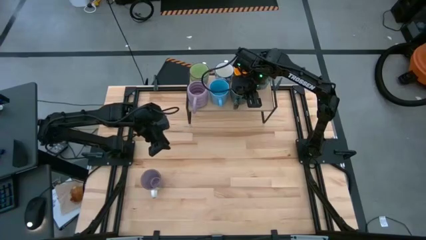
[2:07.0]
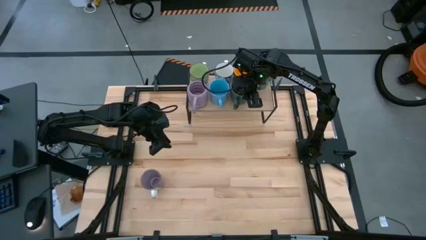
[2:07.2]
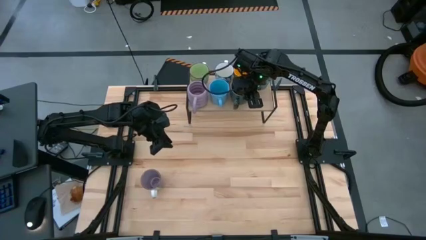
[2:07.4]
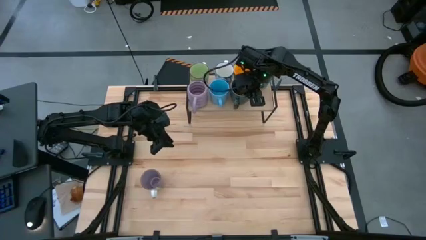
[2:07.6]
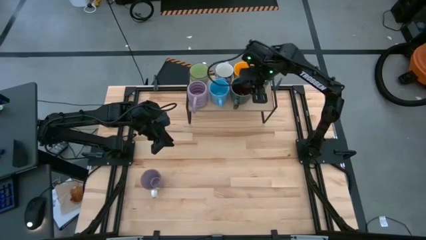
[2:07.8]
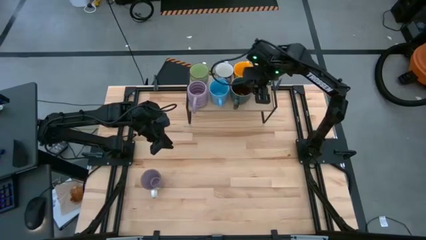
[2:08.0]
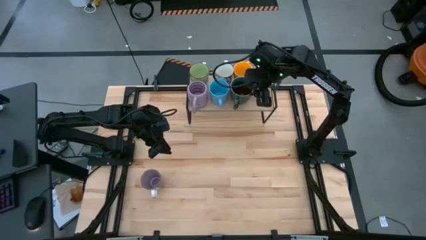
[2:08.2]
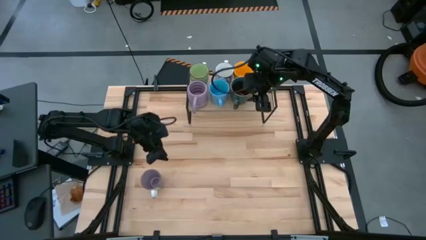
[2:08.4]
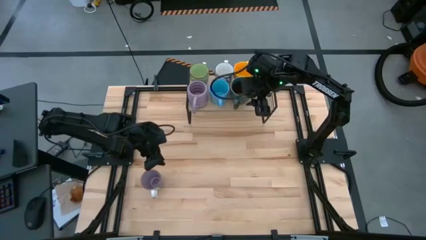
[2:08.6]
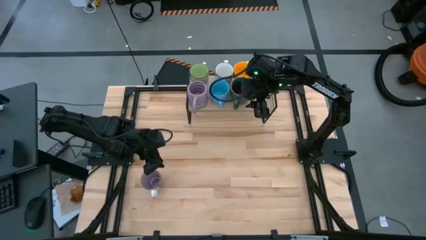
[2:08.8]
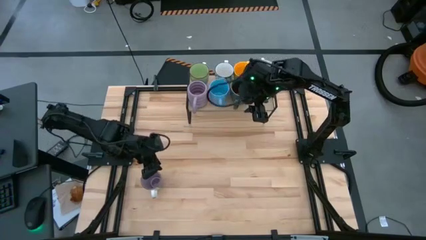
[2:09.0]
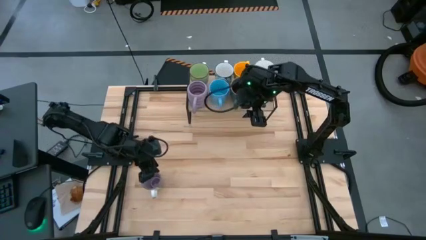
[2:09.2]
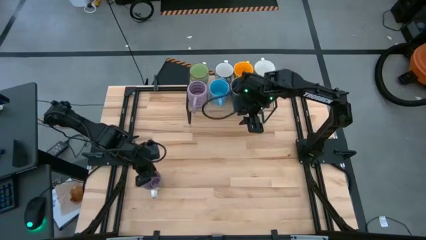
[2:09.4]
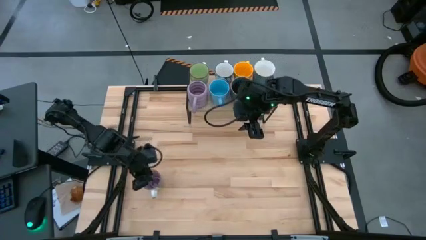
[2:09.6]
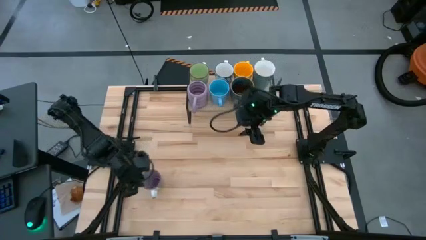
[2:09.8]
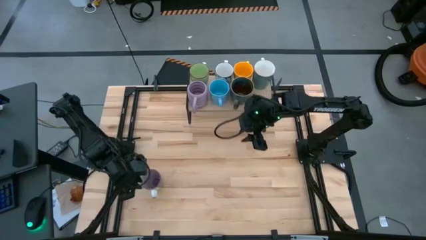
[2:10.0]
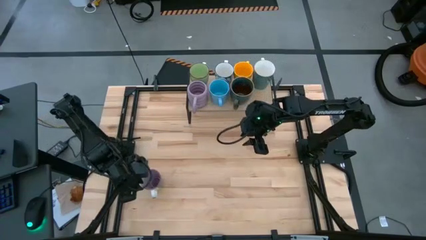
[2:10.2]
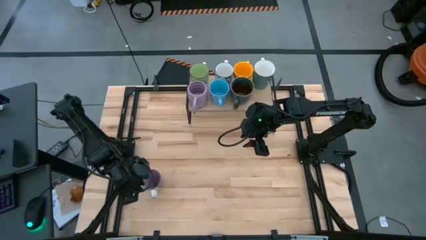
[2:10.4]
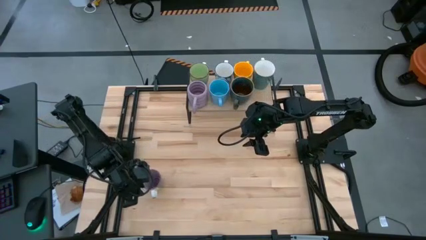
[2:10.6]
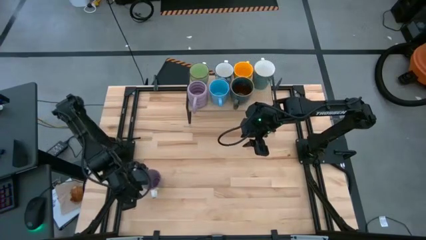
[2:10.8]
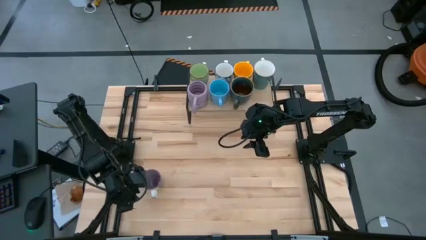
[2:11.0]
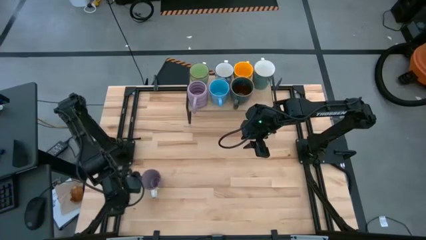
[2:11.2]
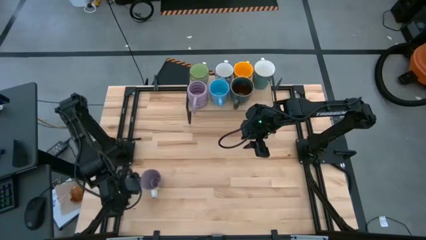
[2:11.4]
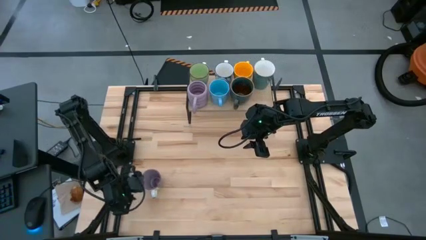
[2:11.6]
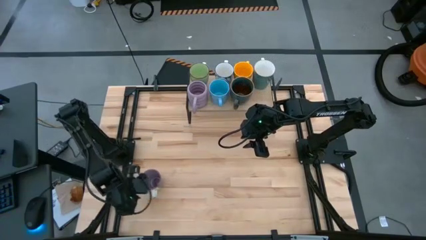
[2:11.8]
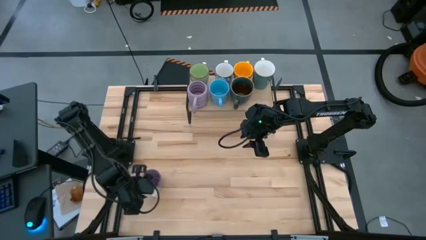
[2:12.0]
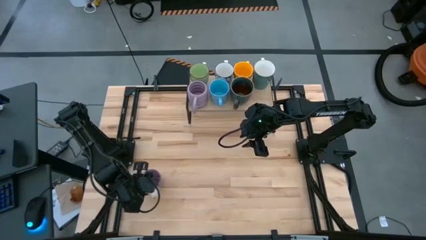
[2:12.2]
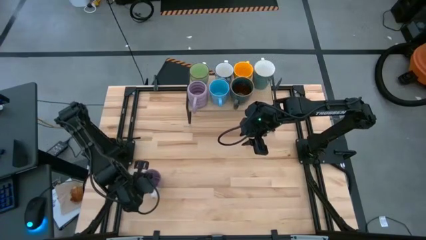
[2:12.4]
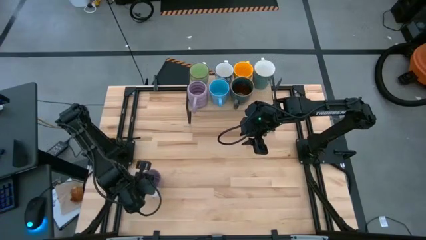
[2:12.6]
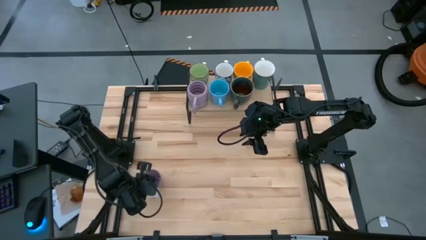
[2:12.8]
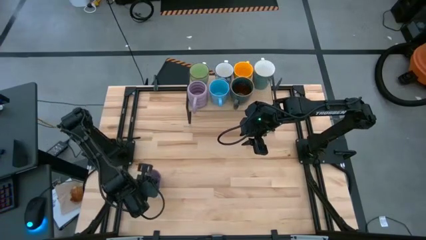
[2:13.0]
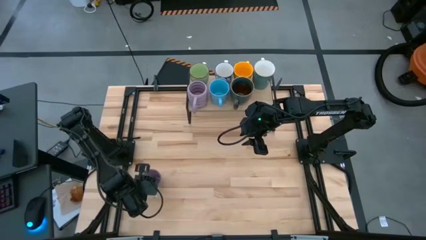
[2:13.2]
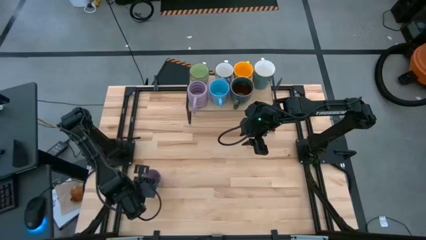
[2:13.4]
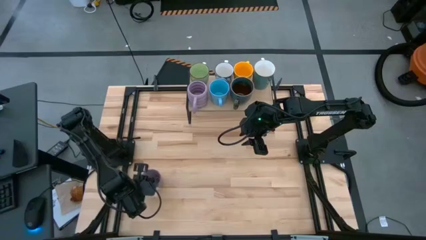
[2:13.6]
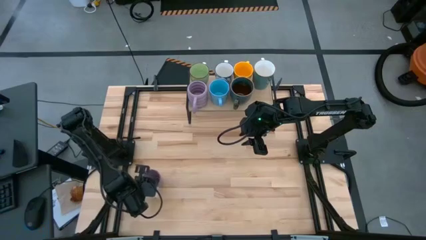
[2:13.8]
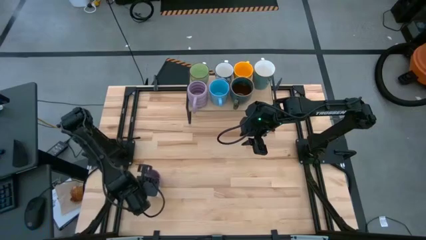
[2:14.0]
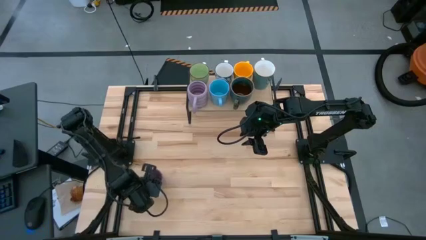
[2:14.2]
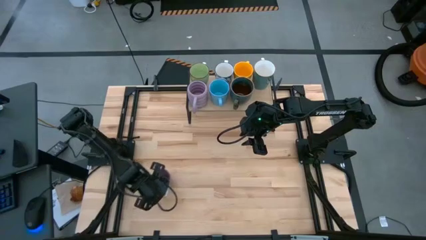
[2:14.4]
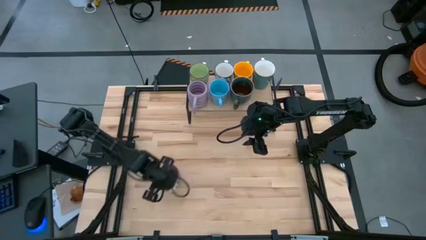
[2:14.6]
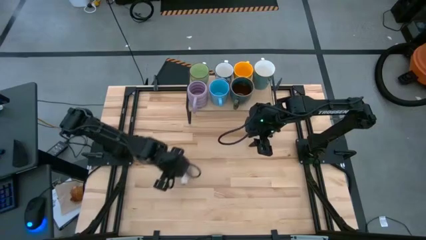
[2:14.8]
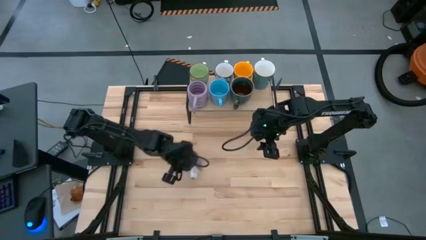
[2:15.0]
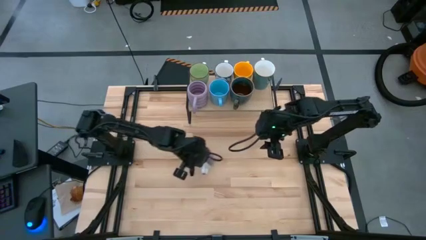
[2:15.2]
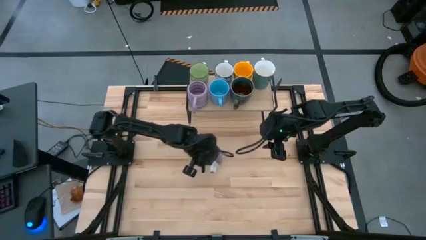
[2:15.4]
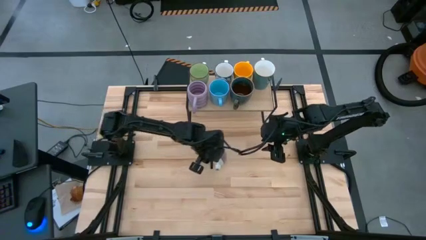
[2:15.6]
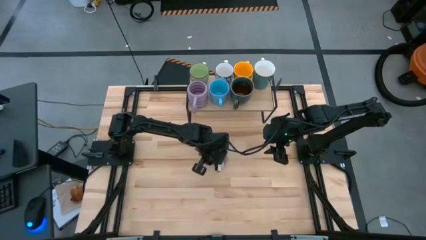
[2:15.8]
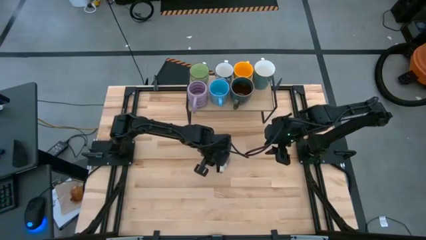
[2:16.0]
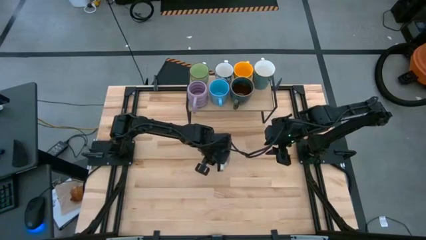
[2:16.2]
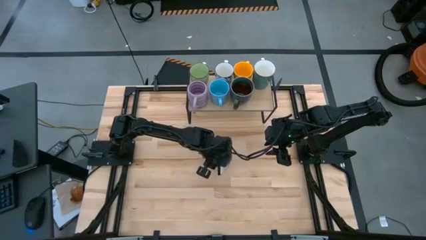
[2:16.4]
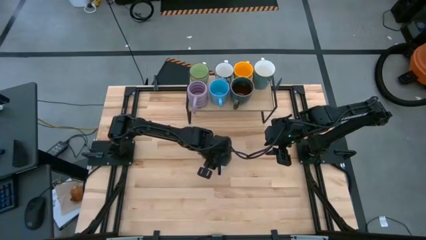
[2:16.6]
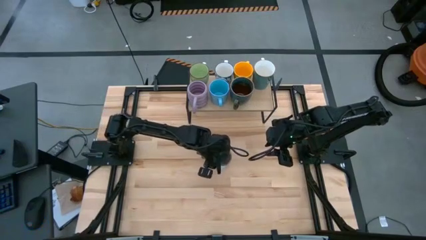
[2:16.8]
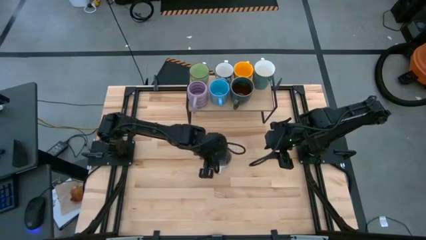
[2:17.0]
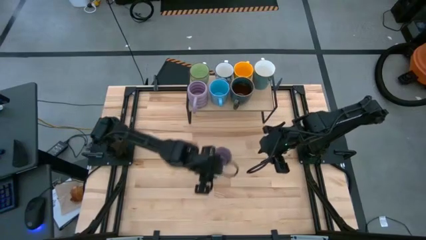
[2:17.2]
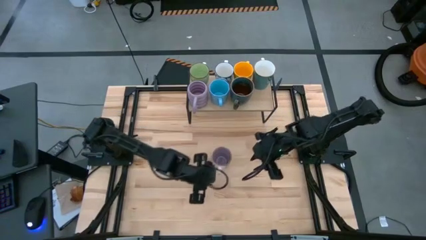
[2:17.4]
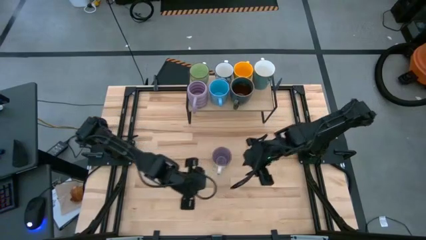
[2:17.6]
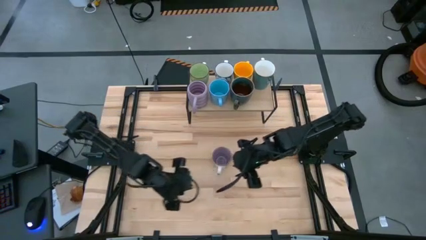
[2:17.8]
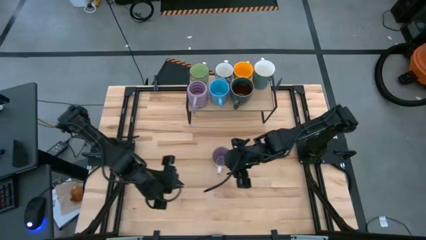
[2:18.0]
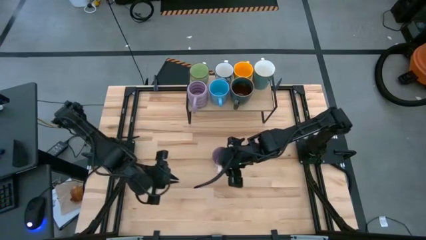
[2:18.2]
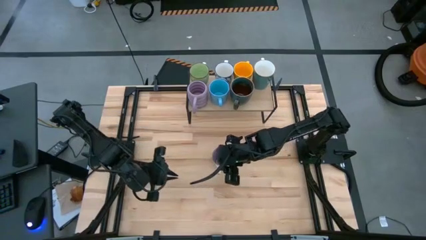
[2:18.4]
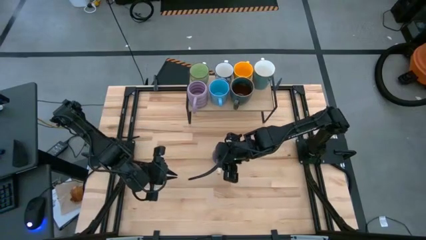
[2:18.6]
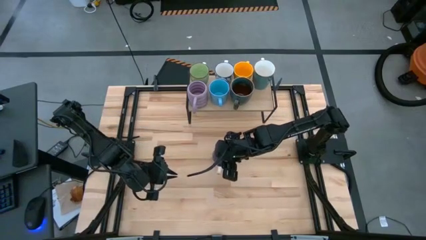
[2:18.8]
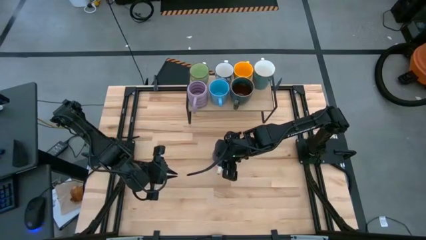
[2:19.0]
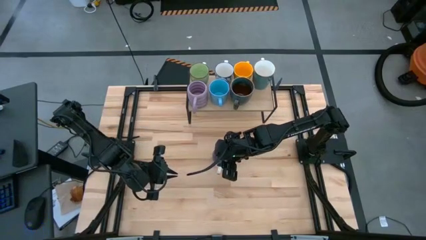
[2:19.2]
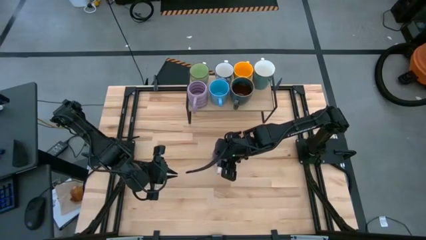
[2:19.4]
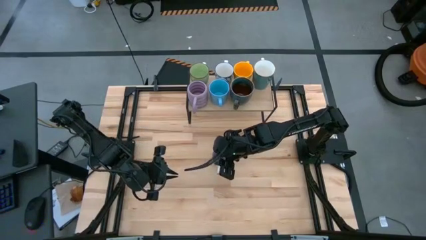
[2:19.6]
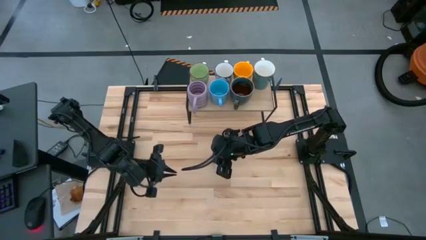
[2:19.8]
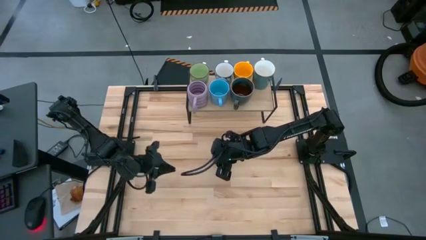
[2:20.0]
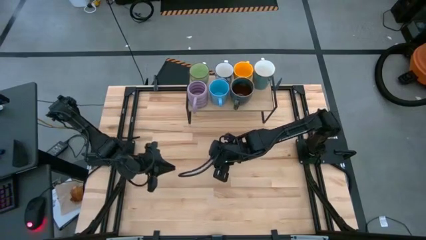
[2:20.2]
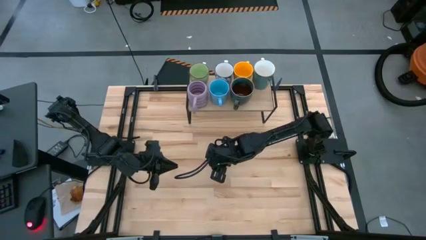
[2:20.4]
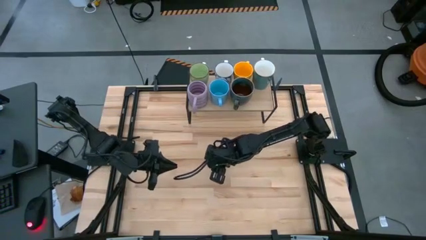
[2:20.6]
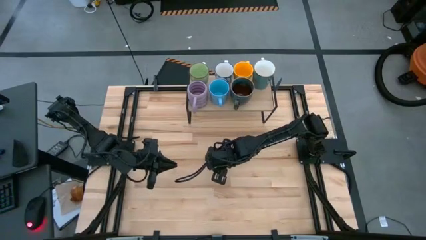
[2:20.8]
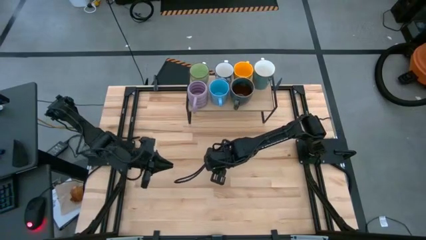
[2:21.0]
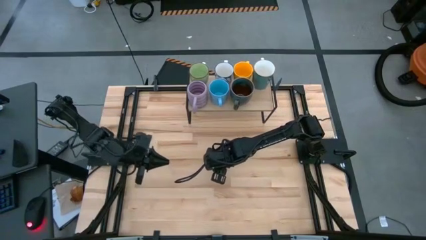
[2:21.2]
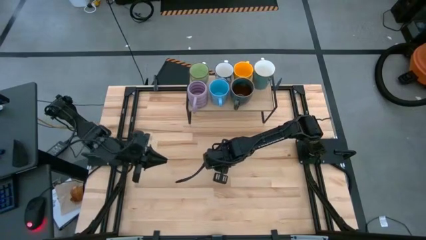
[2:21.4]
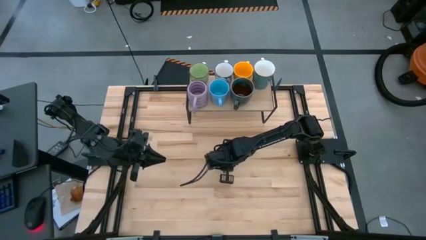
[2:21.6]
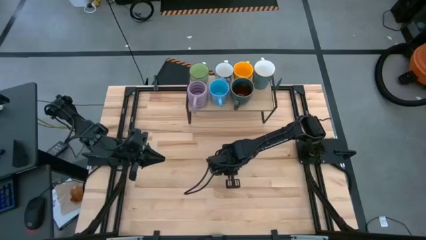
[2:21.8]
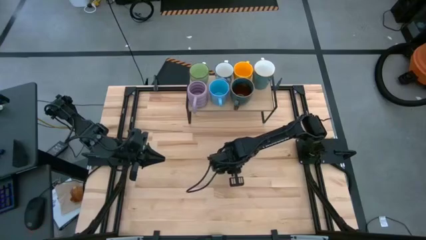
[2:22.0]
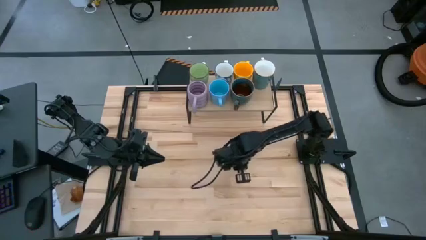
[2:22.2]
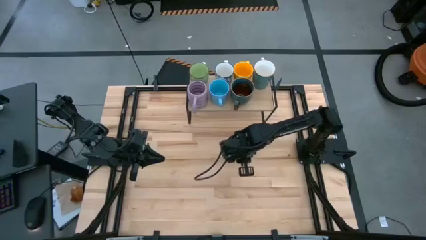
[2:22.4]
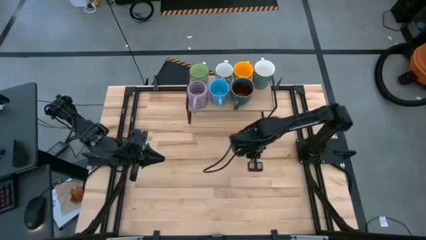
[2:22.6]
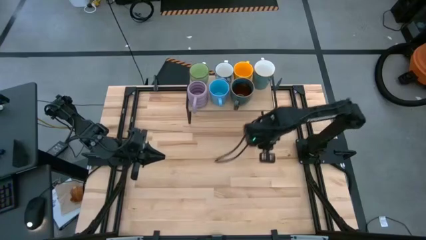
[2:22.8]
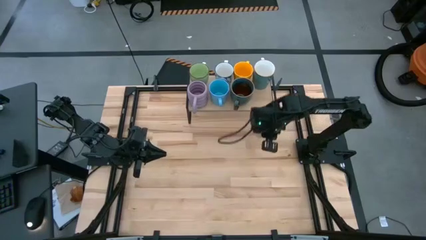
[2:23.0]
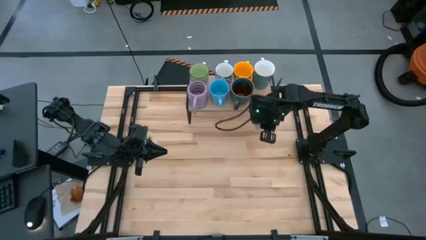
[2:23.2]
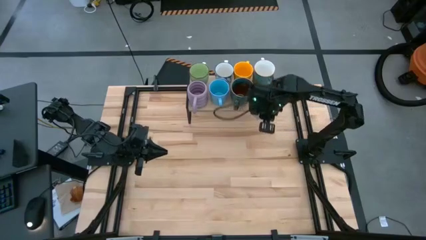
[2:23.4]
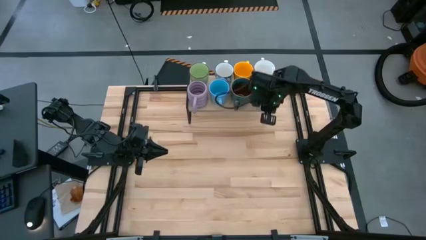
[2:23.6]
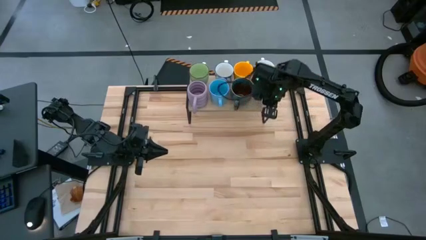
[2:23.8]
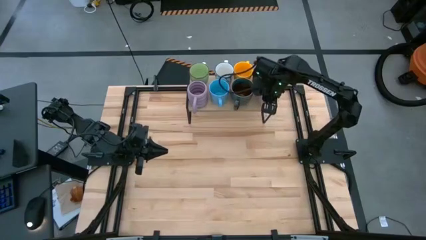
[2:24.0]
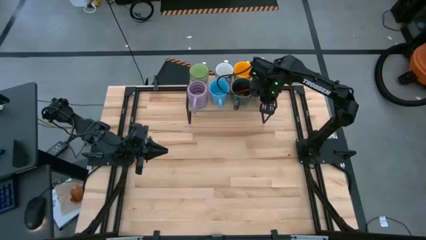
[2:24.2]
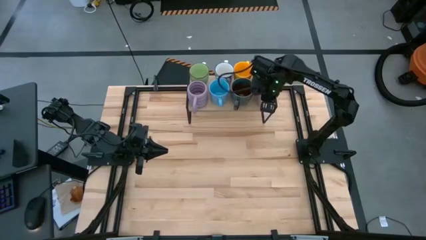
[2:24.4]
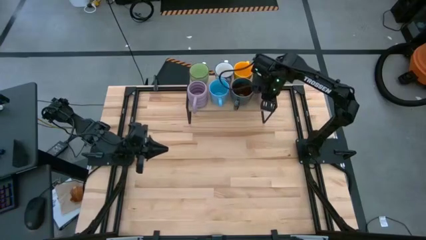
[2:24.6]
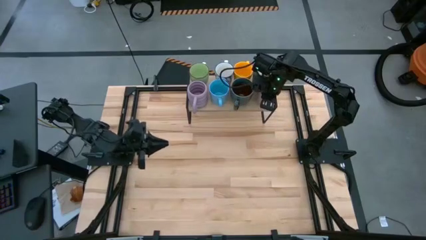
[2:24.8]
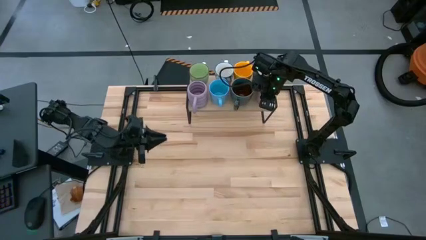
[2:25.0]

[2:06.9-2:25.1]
Task: Place coffee mugs
Put the violet mug on the shelf
